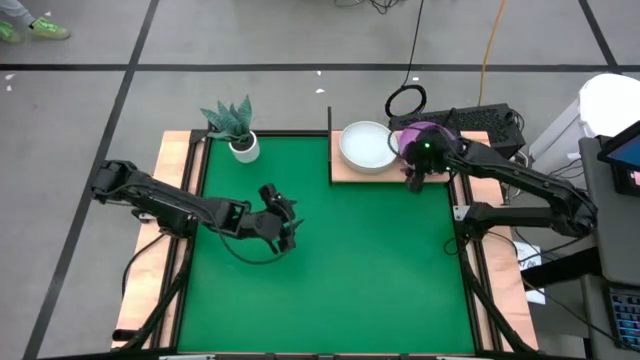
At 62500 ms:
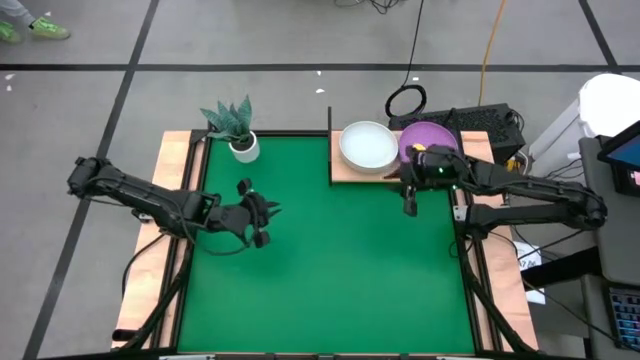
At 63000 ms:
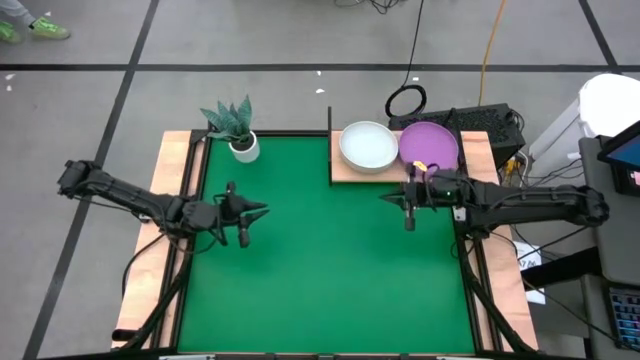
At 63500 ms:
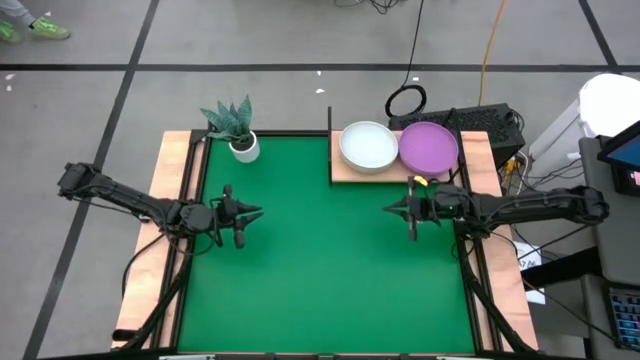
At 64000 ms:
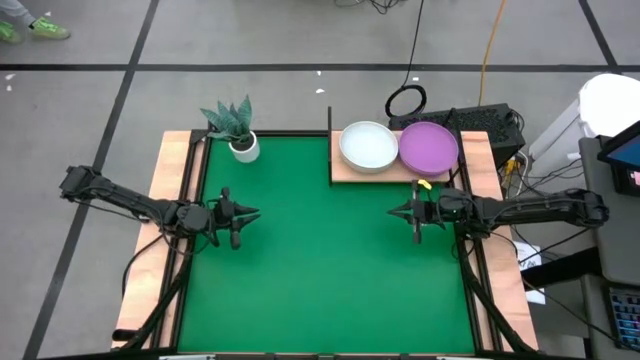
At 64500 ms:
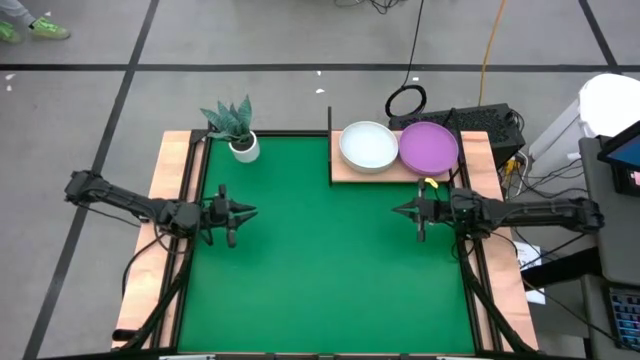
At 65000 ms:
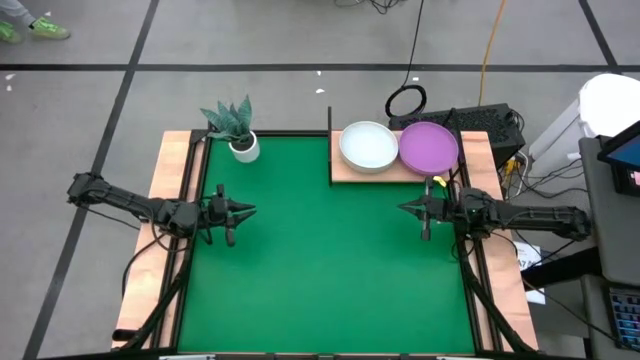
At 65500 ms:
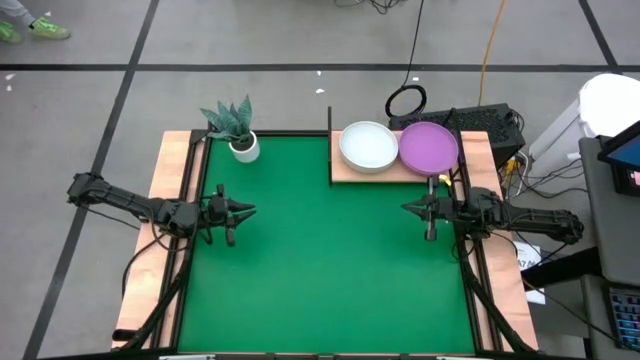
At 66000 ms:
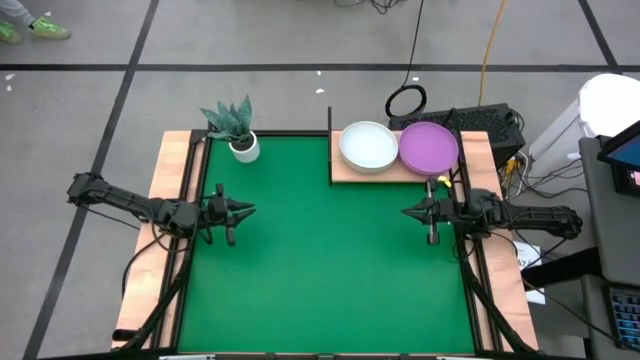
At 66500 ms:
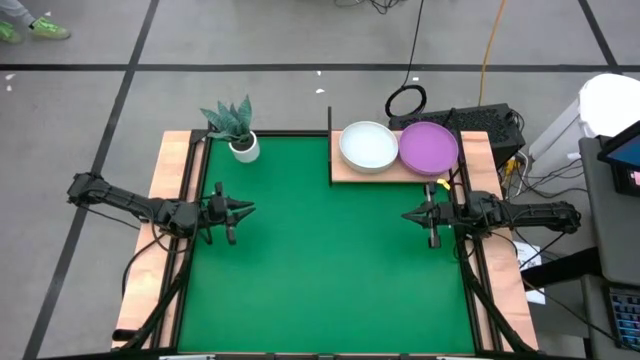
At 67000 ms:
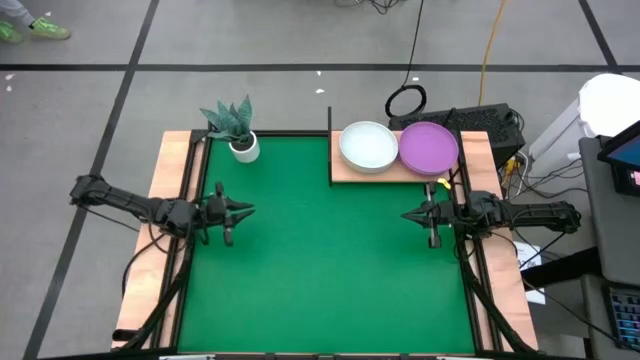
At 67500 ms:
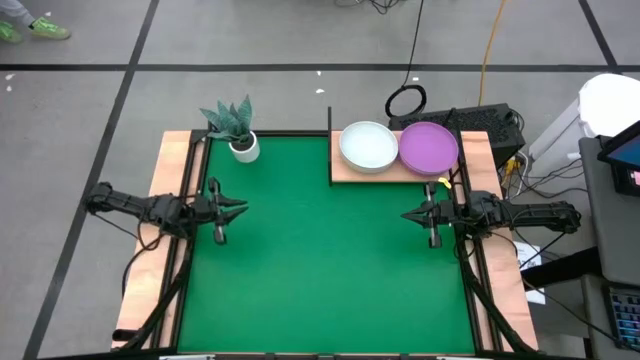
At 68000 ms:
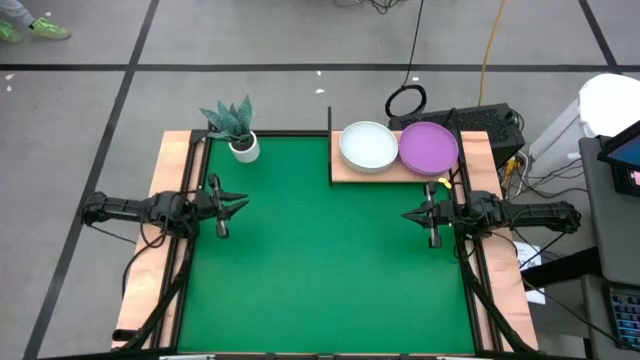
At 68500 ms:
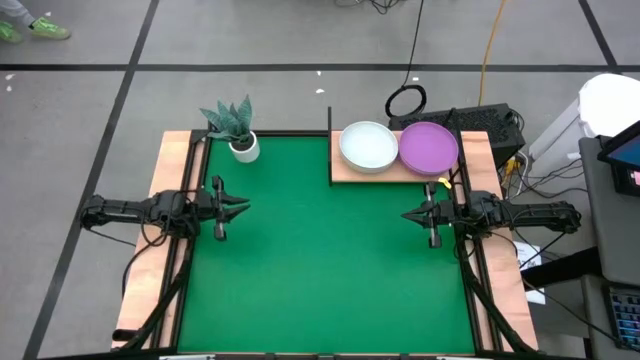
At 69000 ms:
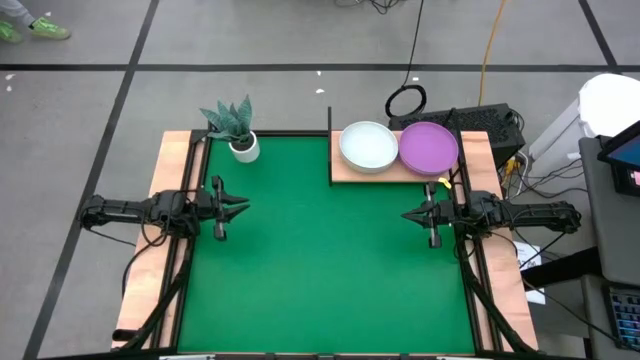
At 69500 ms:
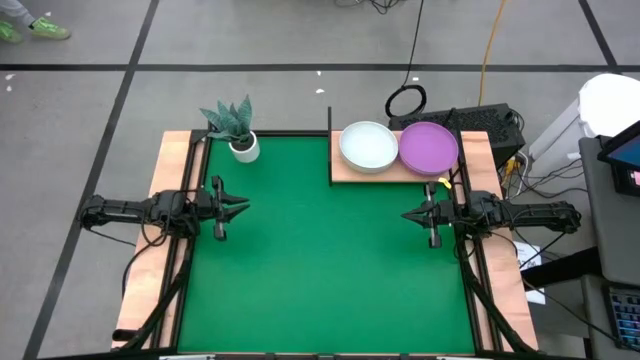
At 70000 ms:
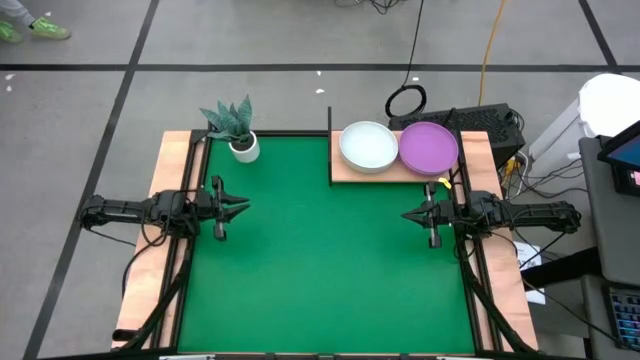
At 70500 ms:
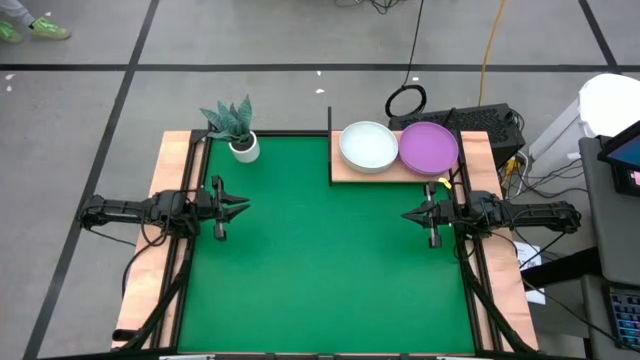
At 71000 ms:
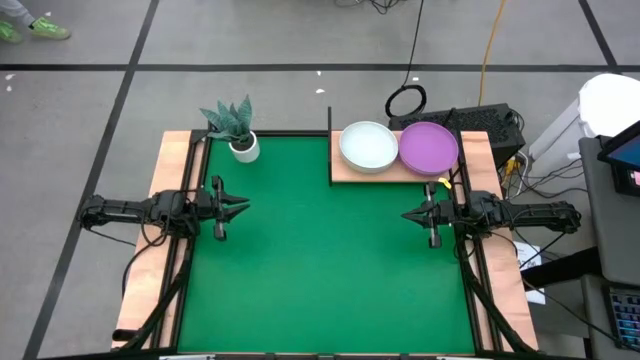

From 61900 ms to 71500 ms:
Task: Place and stack plates onto a shelf
Return to Home Position

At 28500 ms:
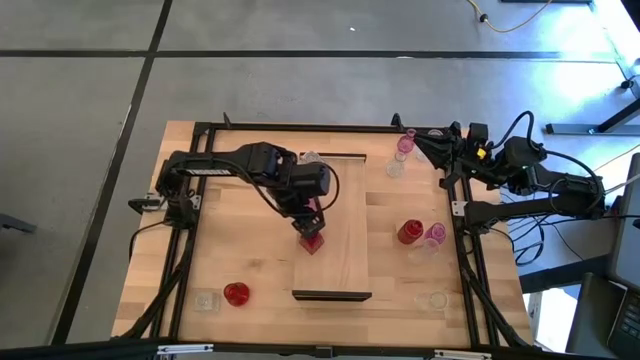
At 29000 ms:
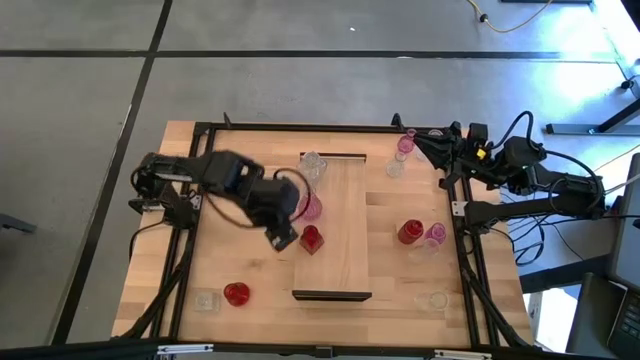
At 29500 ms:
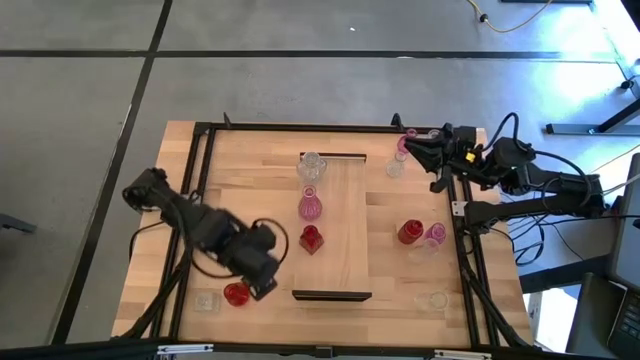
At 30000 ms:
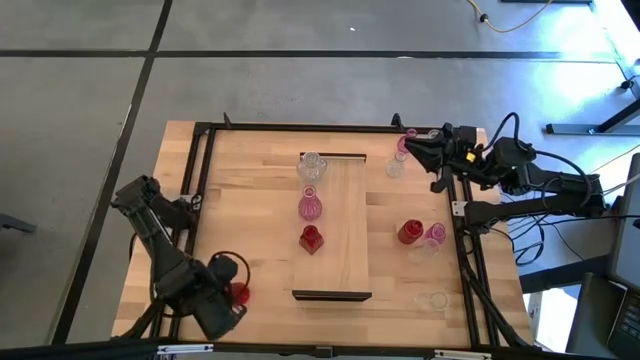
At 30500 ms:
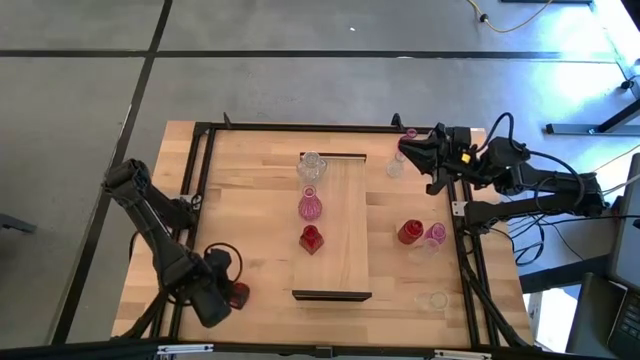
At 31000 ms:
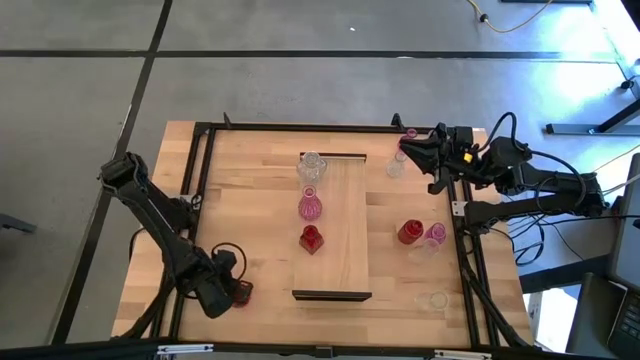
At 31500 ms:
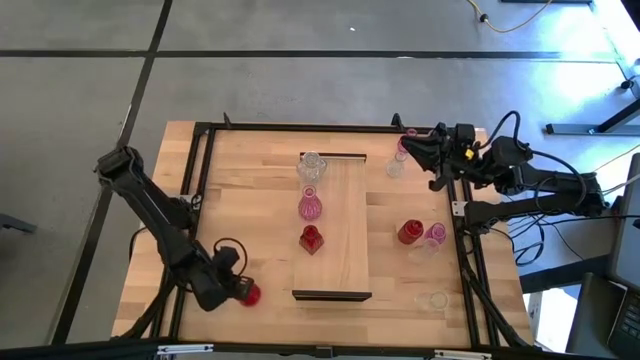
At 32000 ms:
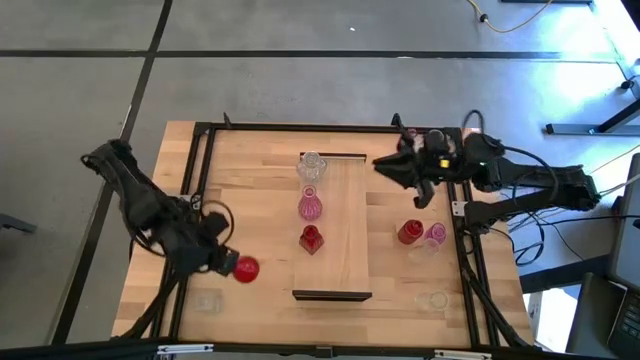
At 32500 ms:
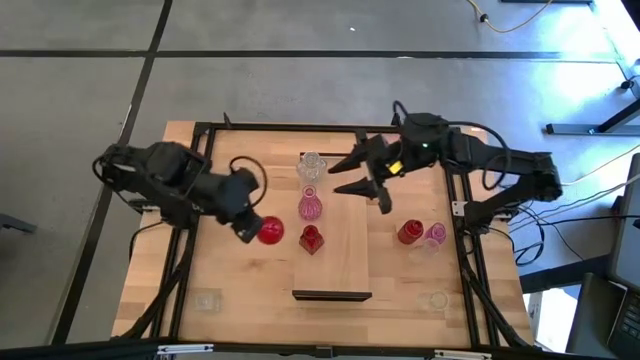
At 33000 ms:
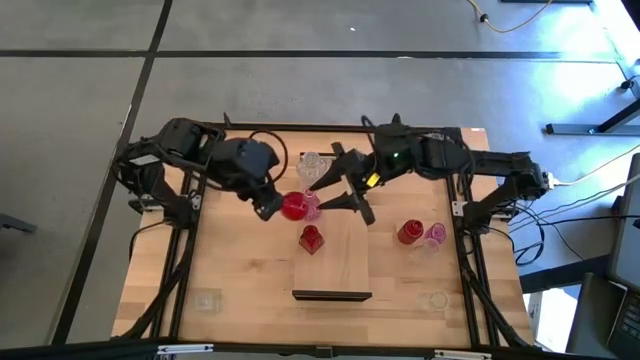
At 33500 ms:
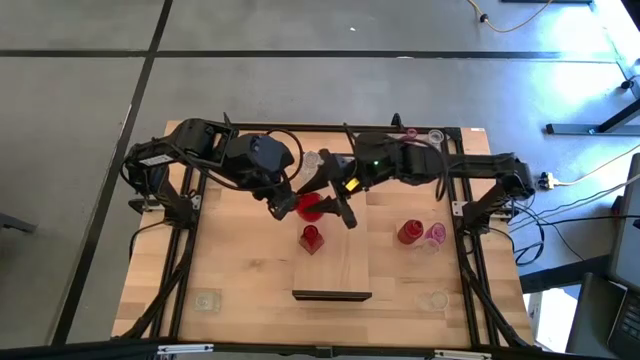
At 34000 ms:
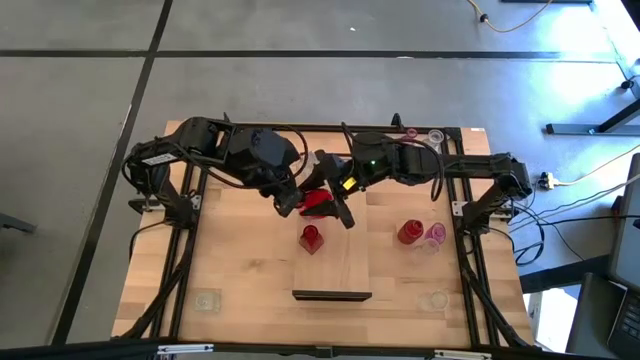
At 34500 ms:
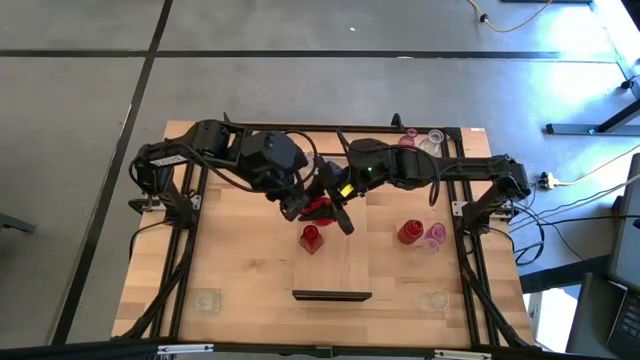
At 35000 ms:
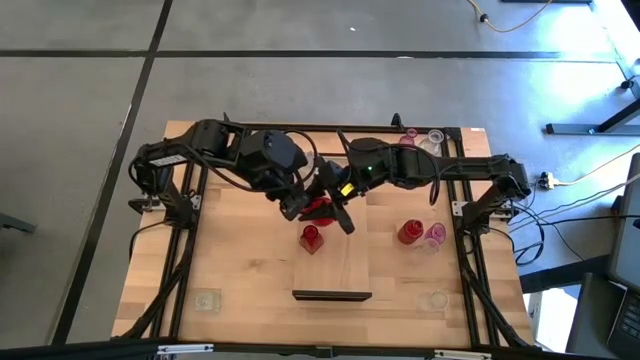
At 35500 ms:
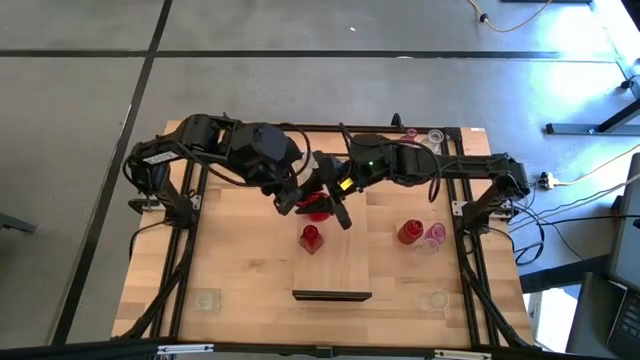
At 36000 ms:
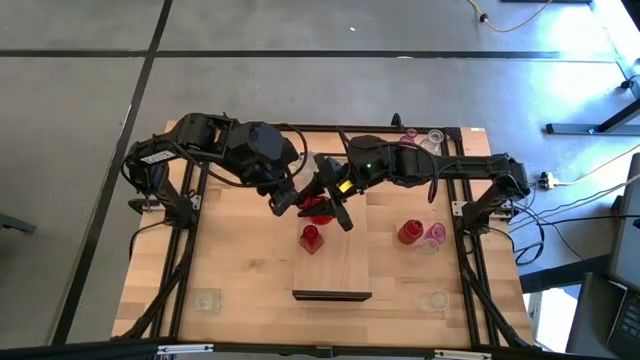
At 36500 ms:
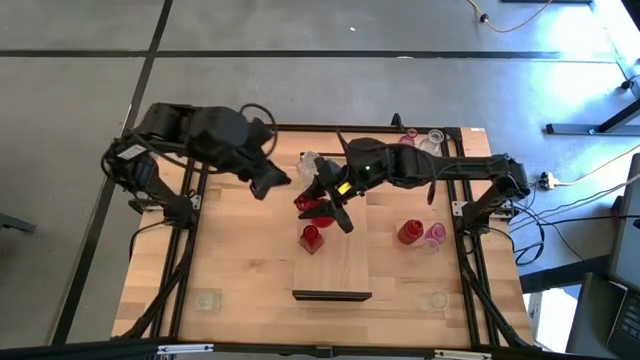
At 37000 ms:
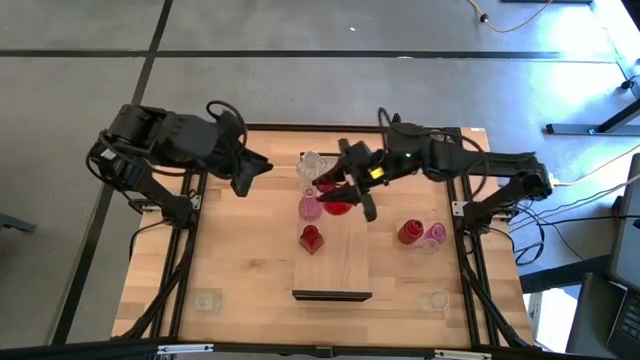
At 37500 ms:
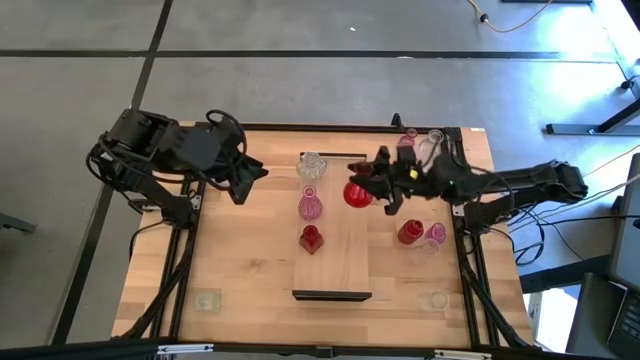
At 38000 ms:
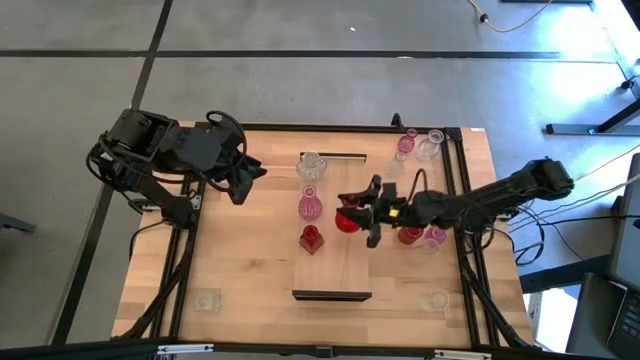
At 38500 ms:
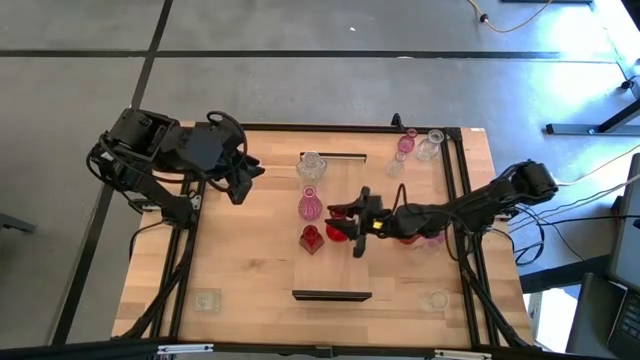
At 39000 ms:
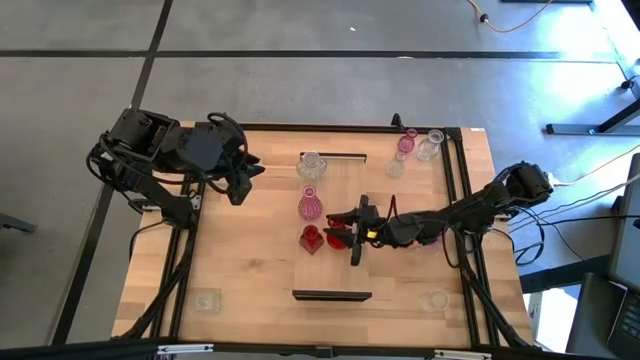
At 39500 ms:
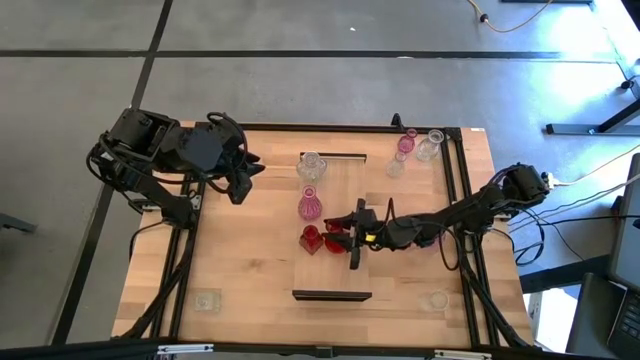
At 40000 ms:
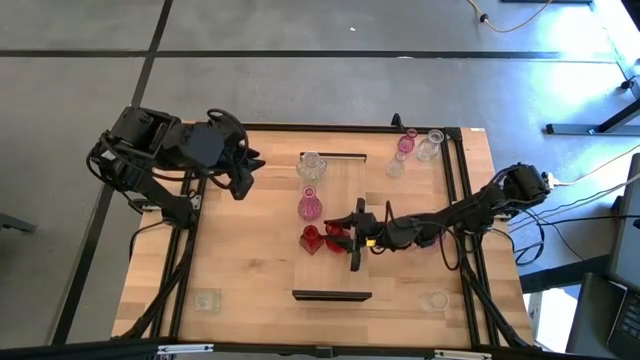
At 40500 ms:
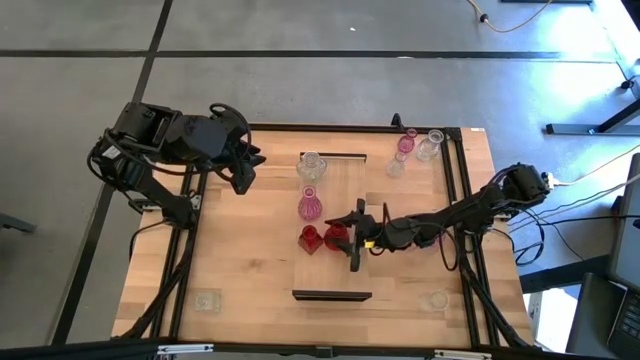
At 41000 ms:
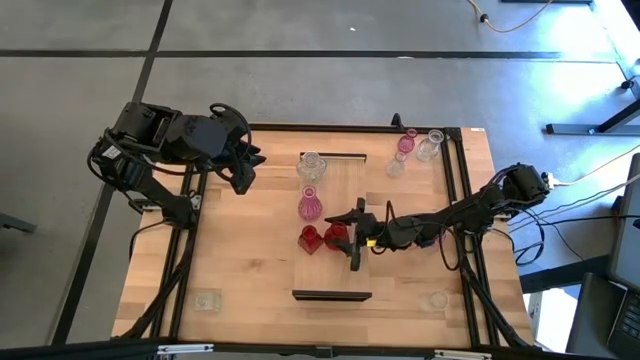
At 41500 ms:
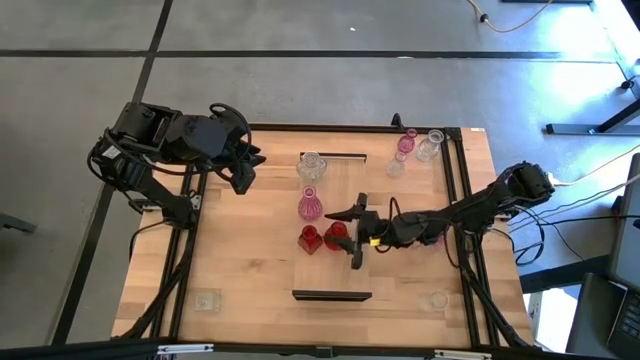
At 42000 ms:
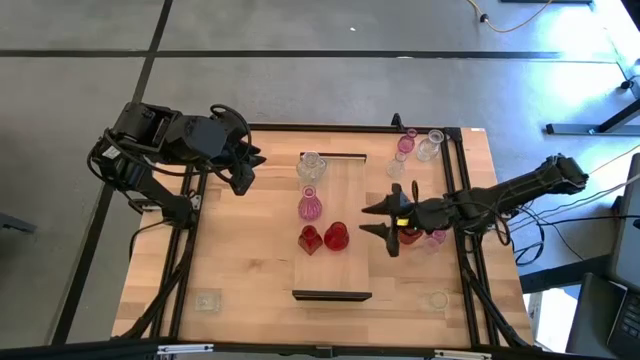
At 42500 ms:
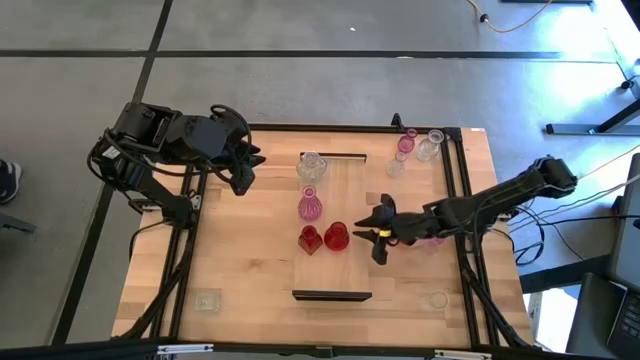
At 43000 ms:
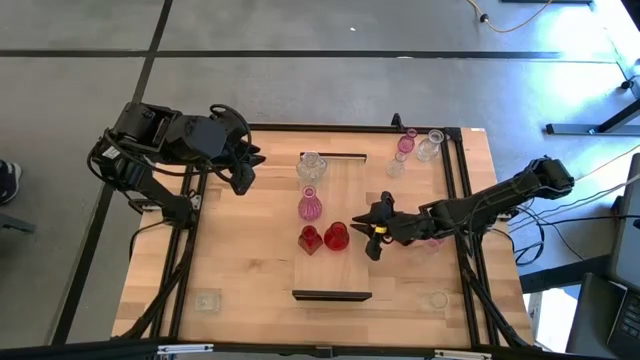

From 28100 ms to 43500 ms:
Task: sort vases onto shelf
Put red vase on the shelf aligned with the other red vase
